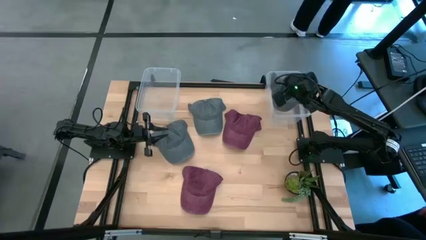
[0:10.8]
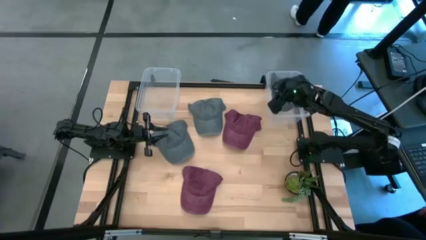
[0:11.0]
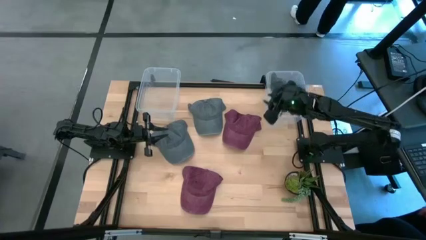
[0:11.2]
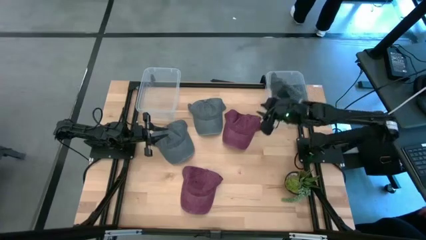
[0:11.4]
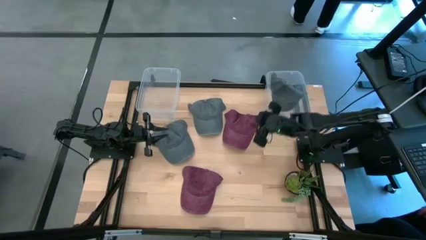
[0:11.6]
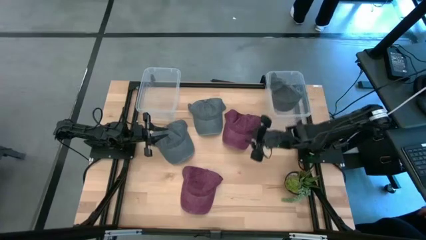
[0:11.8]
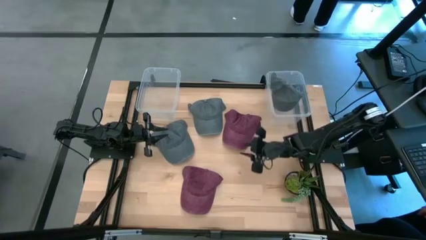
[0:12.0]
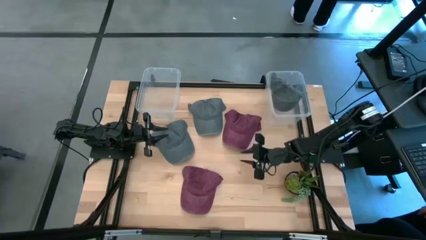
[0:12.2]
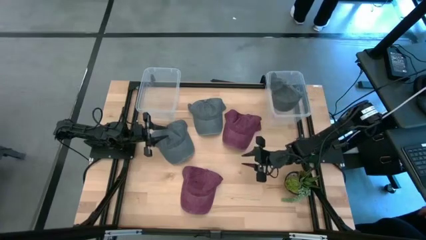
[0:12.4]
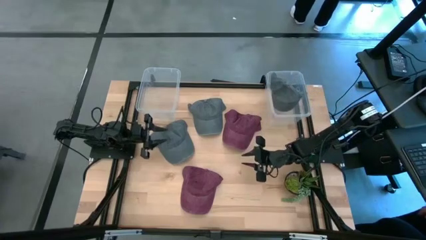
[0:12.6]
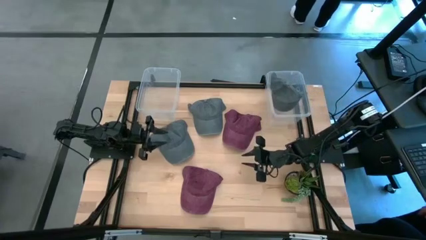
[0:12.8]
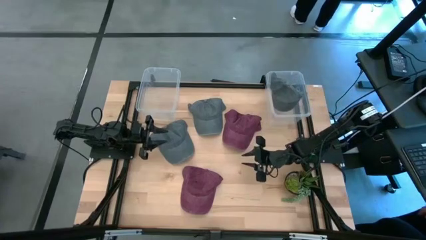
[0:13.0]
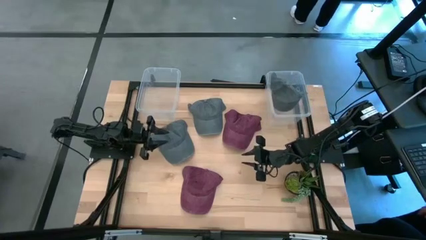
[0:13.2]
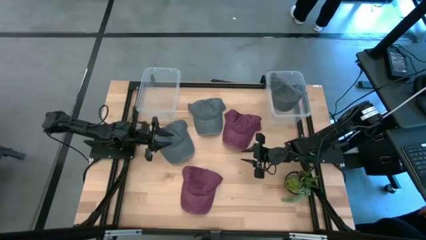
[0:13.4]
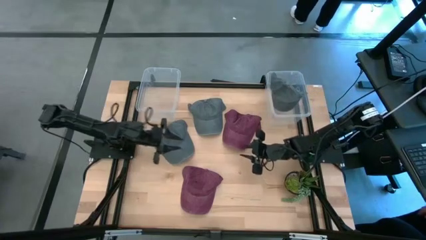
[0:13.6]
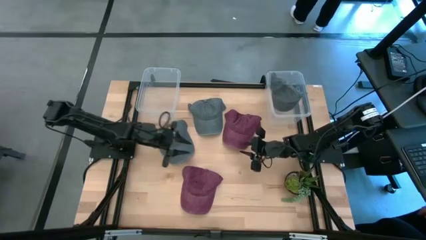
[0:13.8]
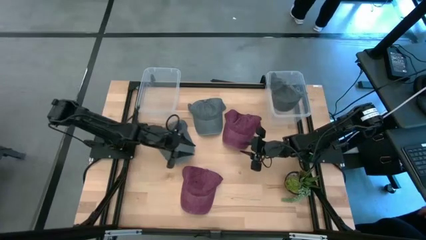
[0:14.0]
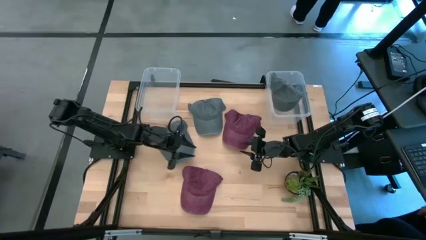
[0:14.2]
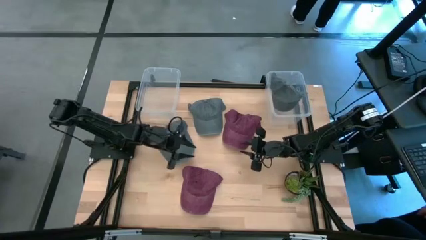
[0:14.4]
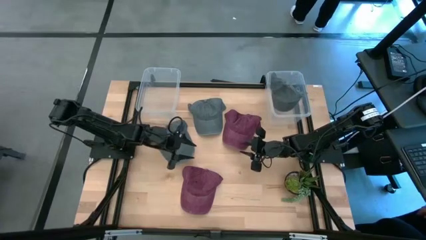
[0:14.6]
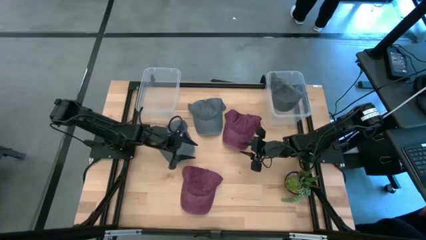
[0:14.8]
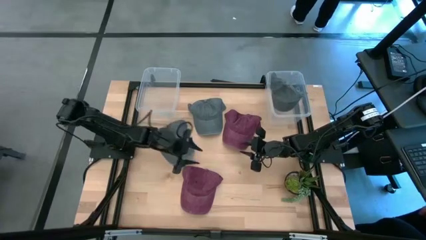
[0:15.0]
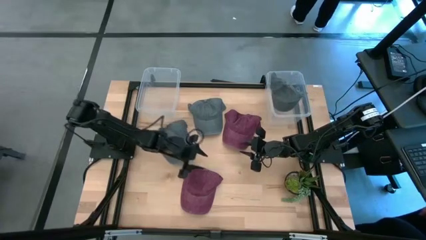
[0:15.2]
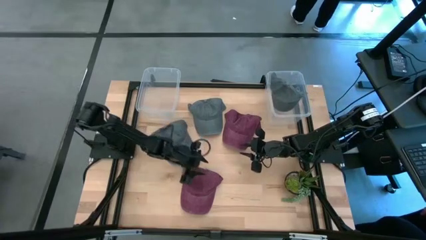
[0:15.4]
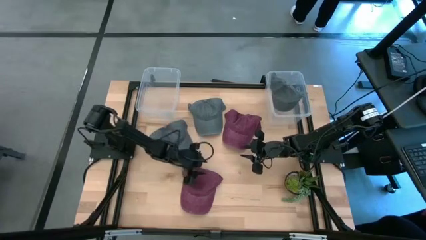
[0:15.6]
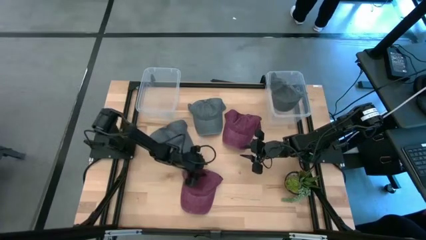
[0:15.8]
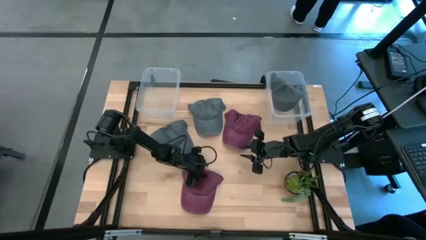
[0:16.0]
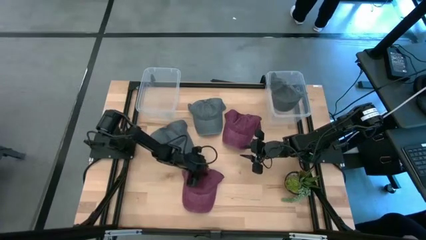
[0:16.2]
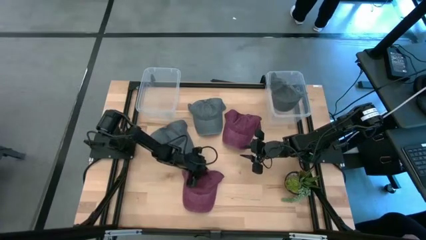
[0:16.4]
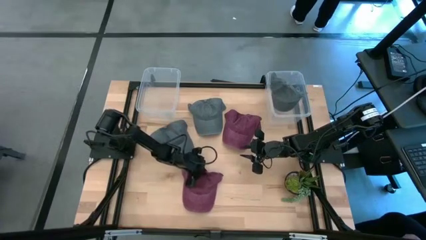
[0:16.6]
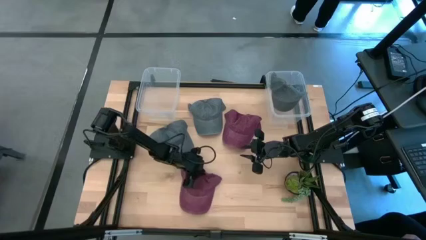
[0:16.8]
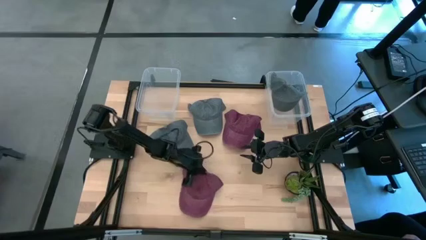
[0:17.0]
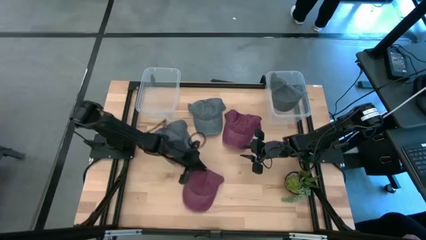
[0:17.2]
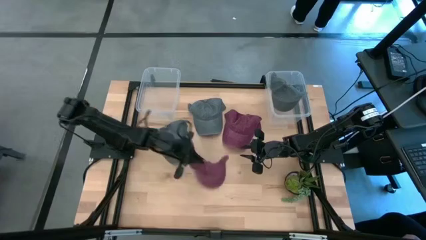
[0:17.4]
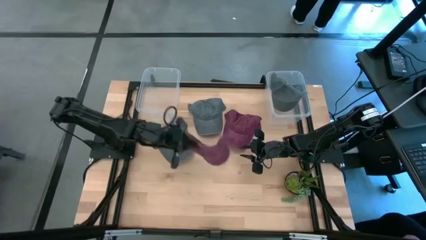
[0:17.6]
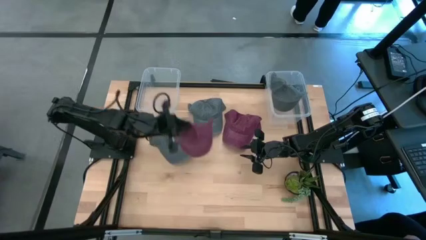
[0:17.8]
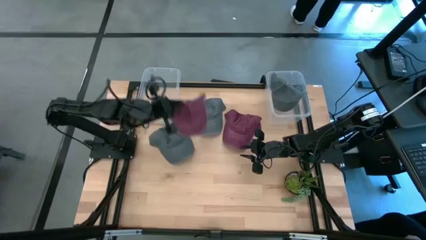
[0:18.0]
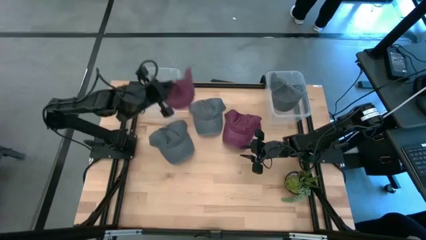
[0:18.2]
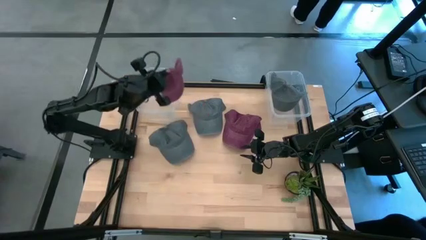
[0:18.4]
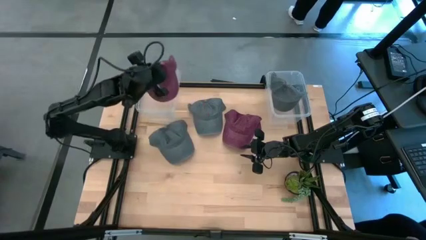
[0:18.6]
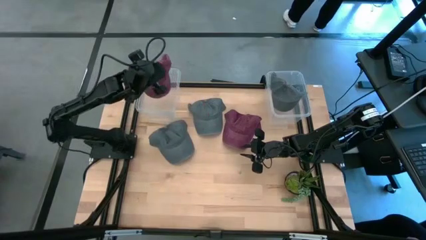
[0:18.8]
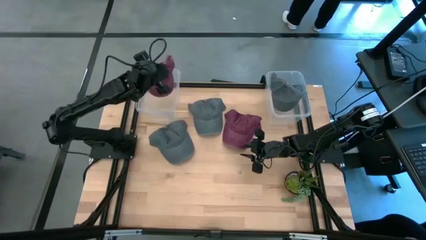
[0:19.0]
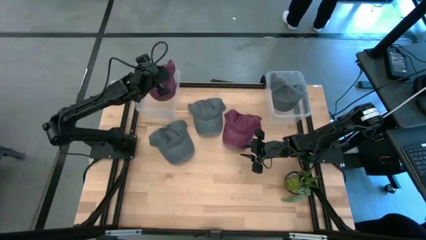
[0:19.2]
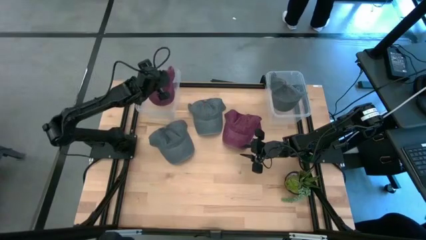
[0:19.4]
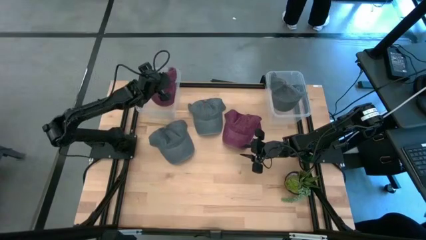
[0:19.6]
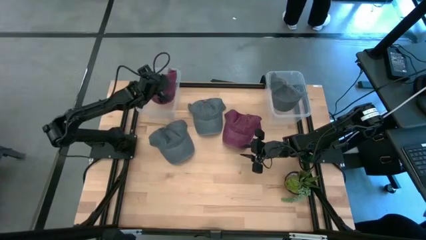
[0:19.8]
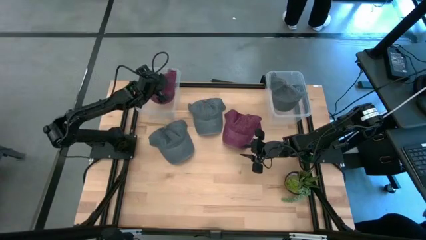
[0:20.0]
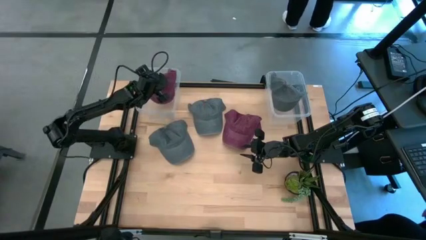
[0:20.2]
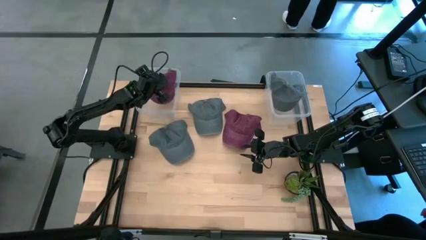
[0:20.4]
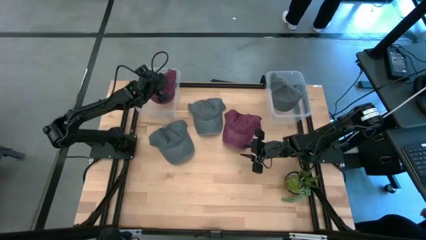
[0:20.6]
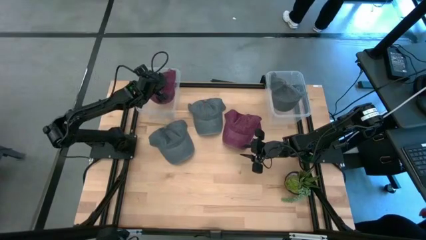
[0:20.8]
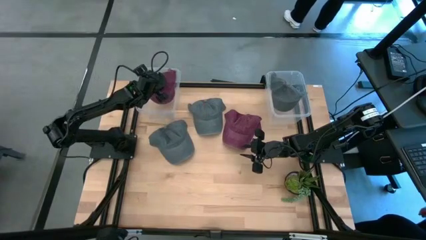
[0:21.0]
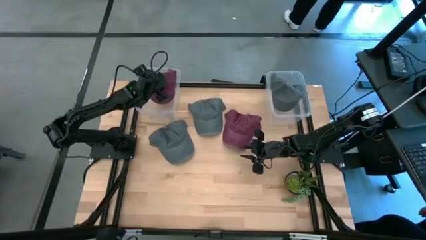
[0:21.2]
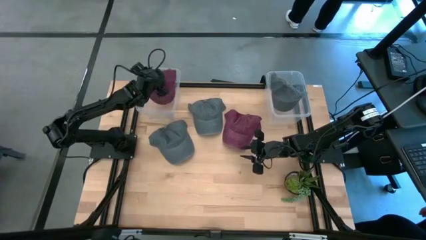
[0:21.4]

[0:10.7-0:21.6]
Task: Pick & Place hat
Put the bottom red cap into the left transparent bin
